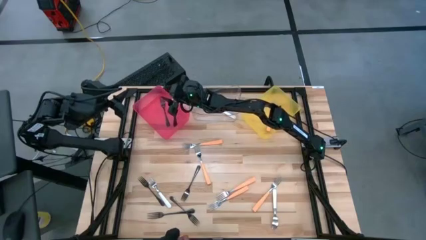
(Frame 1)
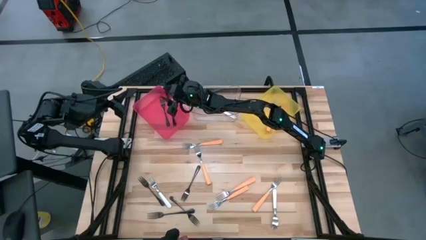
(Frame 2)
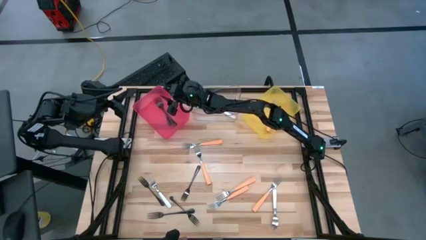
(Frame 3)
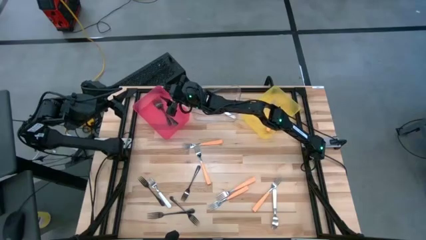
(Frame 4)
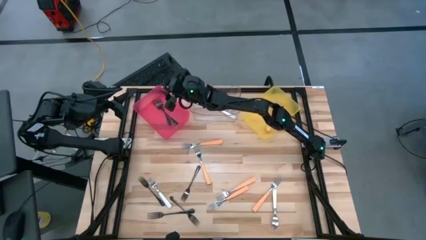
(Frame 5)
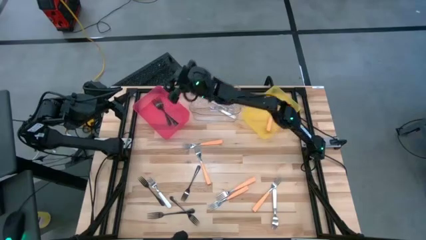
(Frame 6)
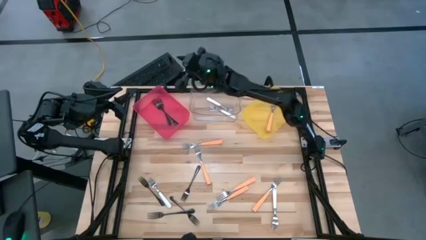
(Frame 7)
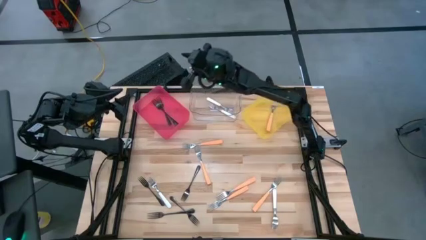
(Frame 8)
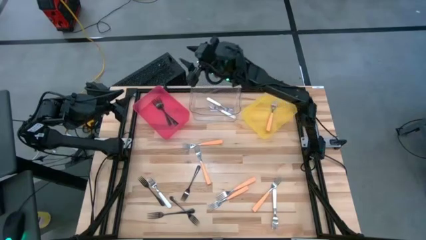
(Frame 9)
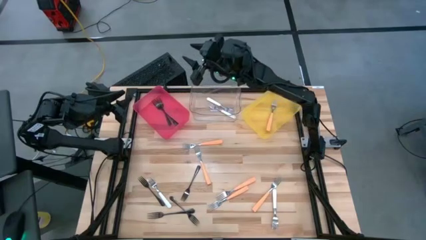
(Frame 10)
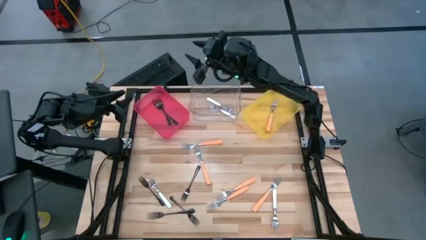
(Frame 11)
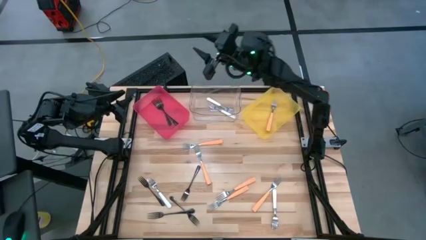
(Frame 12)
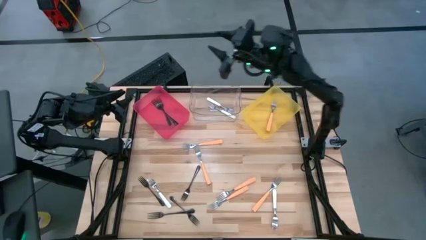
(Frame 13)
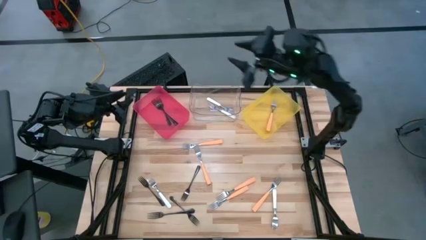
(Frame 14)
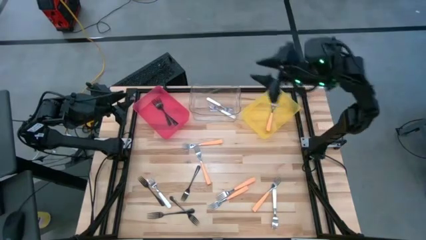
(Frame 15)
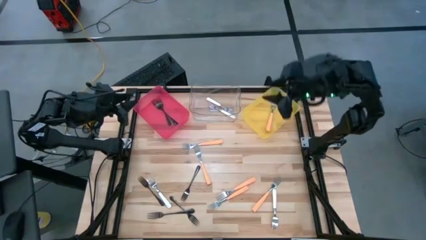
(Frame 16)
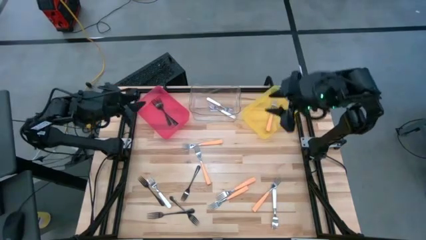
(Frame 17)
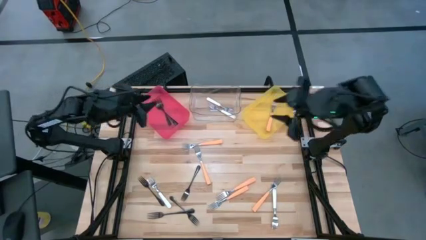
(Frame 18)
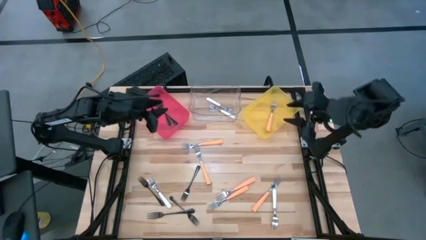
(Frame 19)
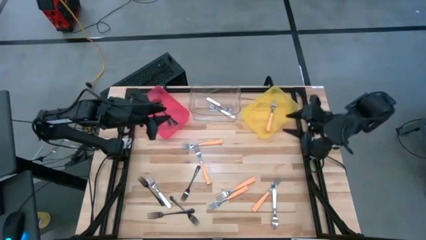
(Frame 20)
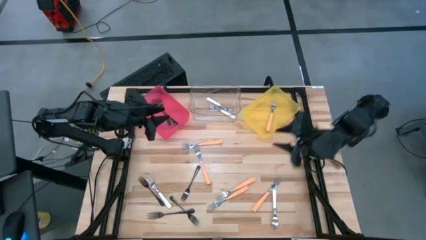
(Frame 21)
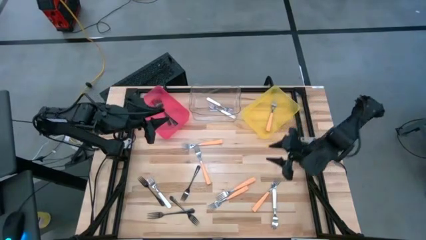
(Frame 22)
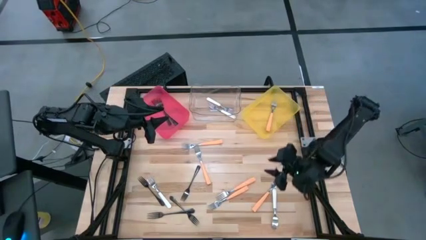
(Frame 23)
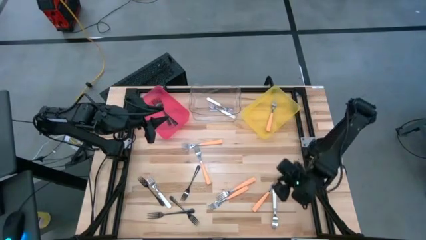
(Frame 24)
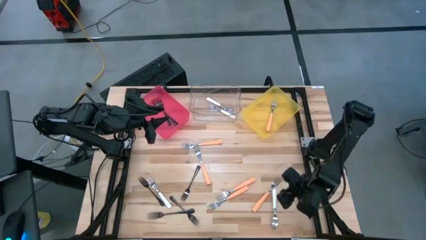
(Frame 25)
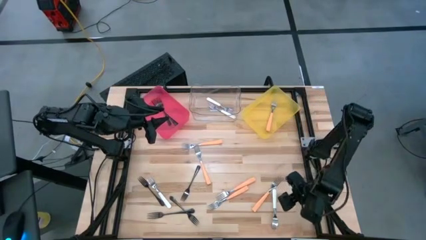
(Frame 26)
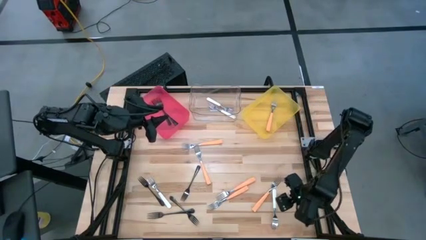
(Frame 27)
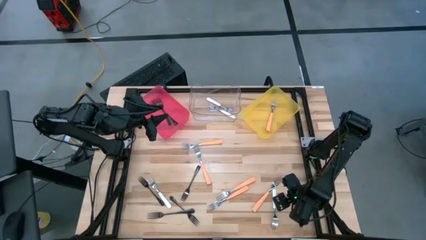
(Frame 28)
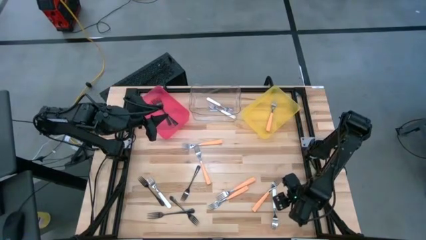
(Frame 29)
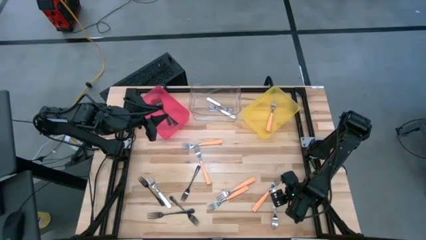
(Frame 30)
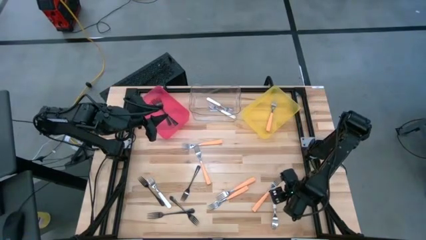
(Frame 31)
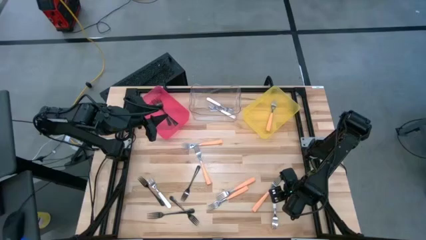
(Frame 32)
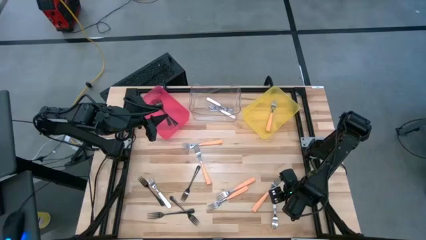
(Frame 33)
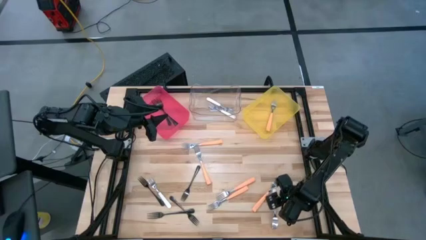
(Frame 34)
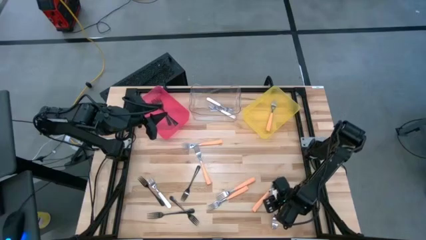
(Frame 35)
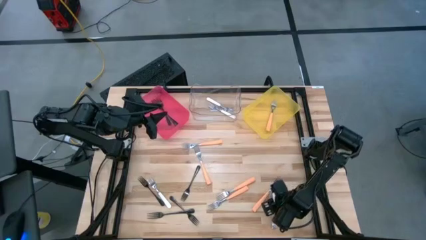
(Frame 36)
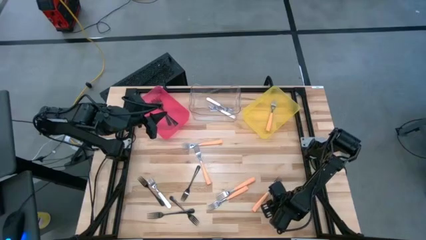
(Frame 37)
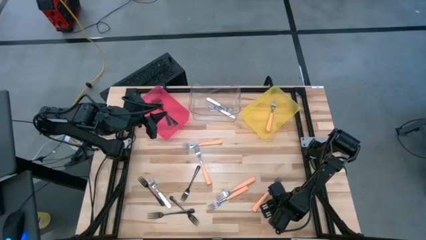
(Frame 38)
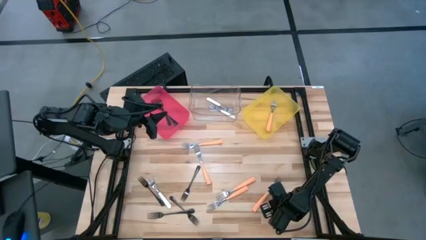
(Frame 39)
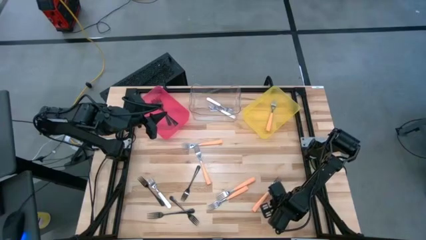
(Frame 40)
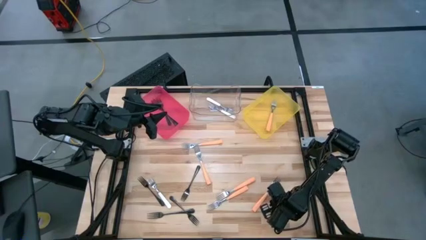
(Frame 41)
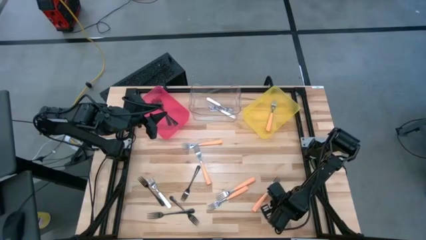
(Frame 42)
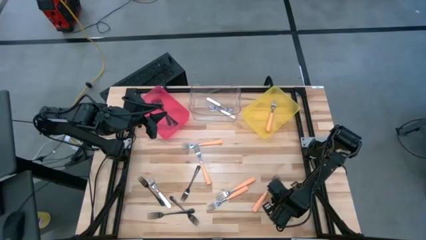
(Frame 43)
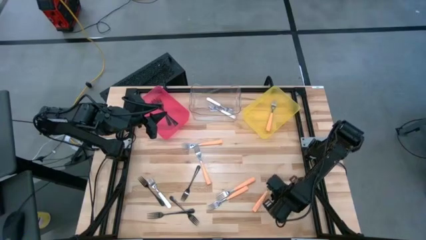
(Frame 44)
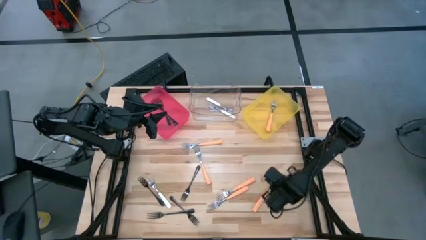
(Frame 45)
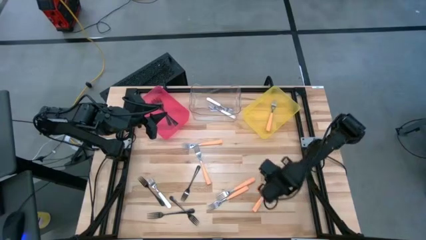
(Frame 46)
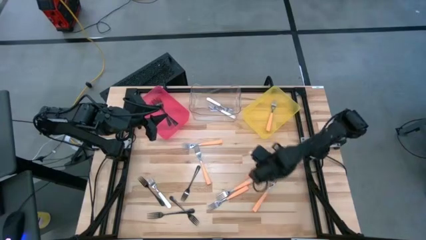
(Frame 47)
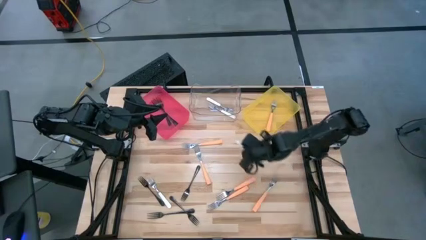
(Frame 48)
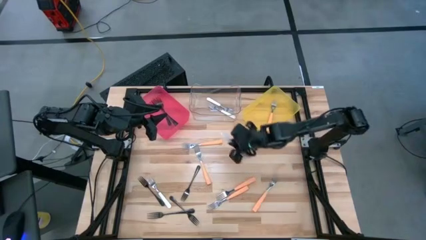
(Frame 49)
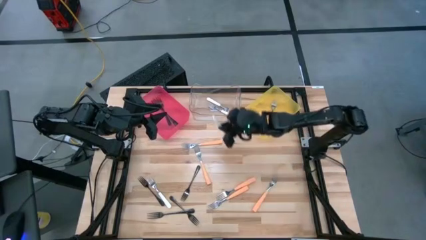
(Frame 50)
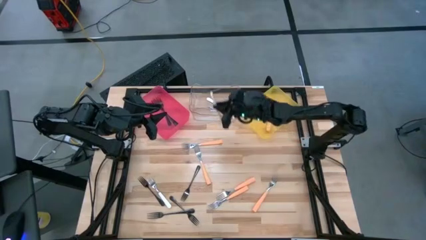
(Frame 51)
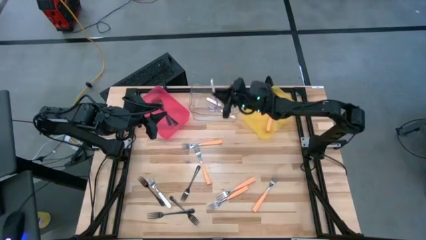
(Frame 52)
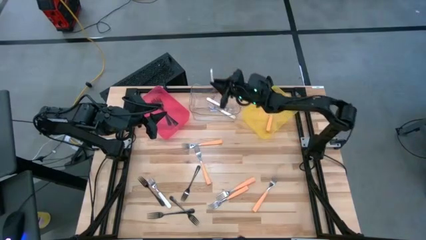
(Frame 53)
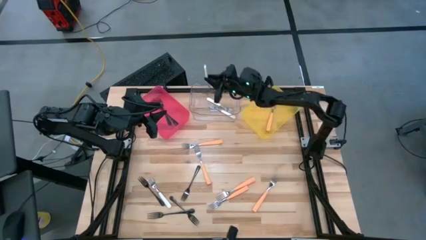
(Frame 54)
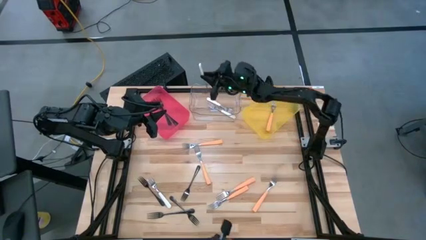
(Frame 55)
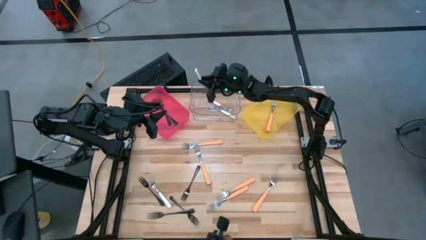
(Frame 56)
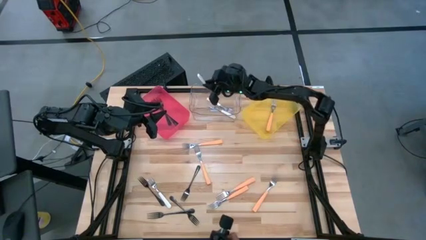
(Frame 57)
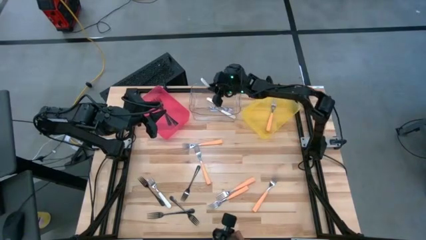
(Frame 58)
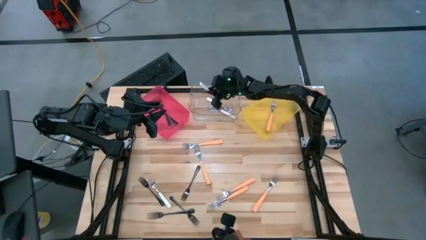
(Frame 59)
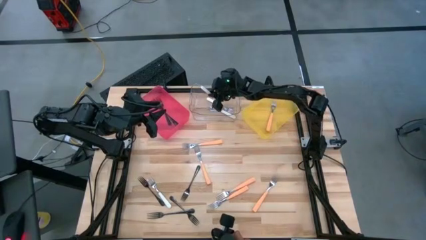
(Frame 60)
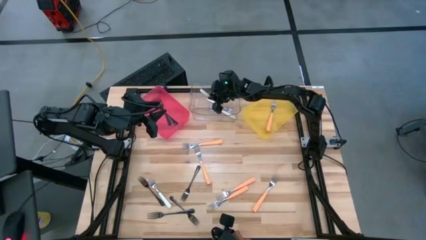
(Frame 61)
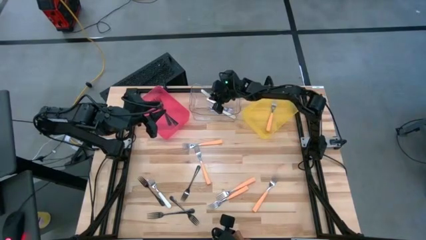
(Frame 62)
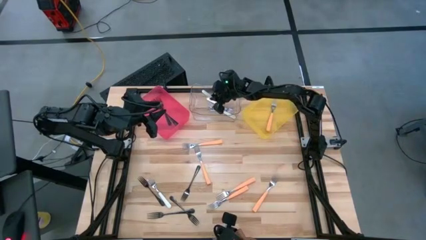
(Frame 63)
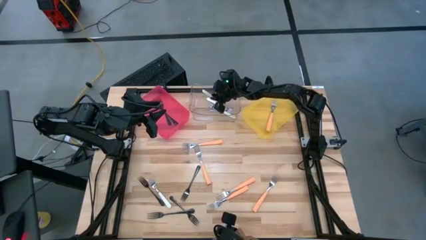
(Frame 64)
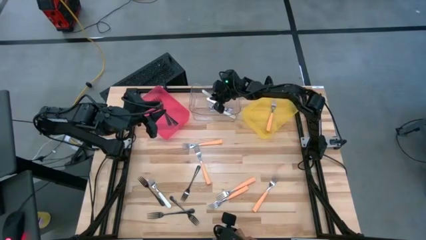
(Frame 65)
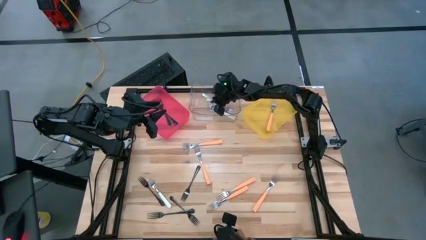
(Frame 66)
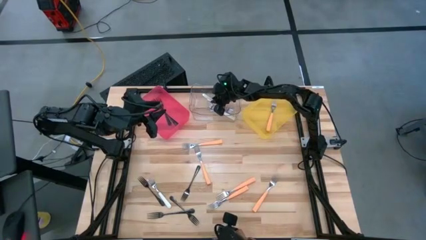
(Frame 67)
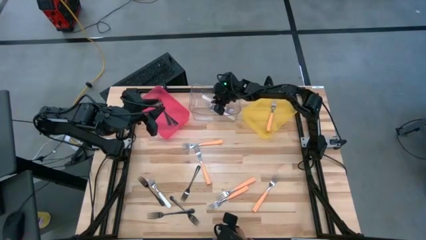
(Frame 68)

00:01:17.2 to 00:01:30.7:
Task: Sort silverware by color (type)
Put the white fork into the transparent bin
